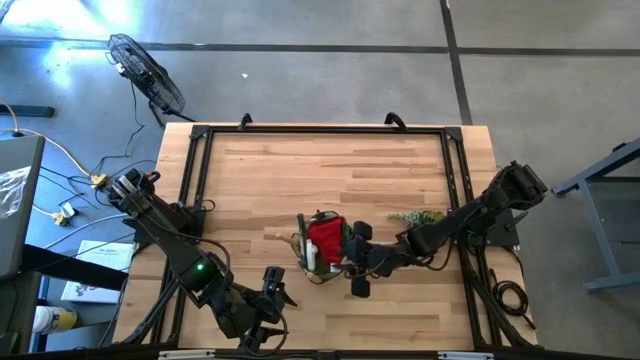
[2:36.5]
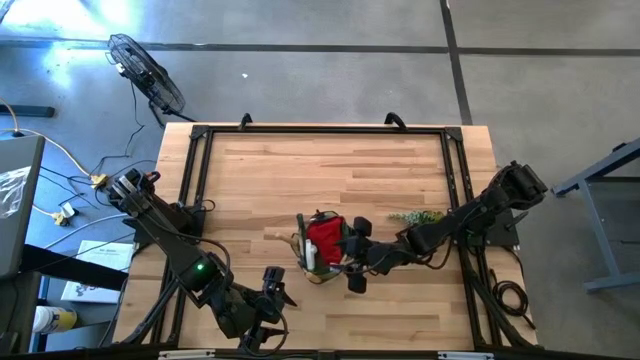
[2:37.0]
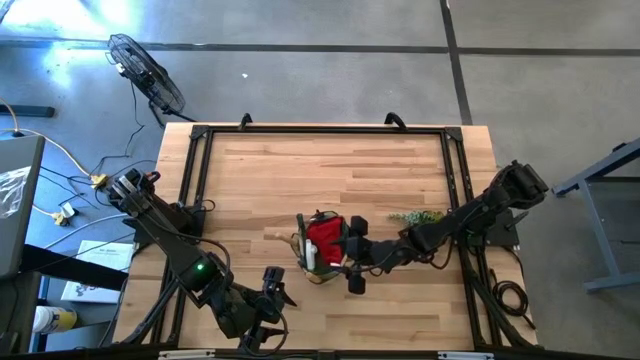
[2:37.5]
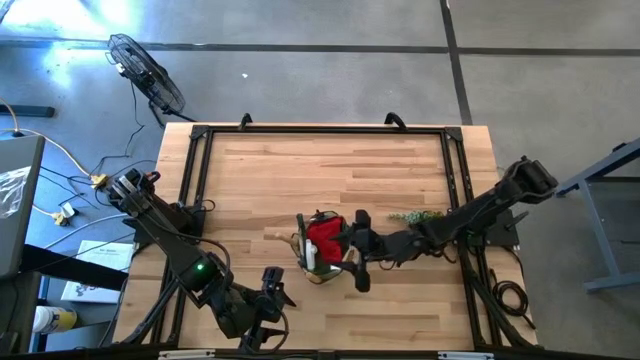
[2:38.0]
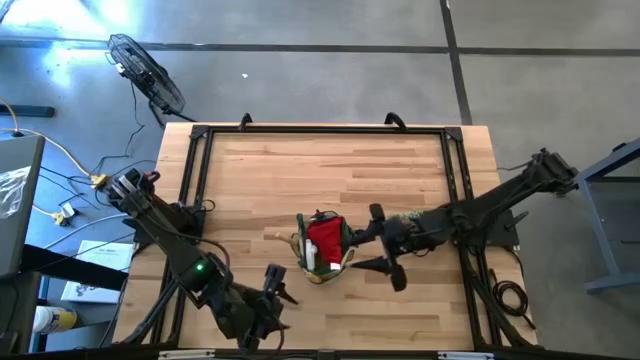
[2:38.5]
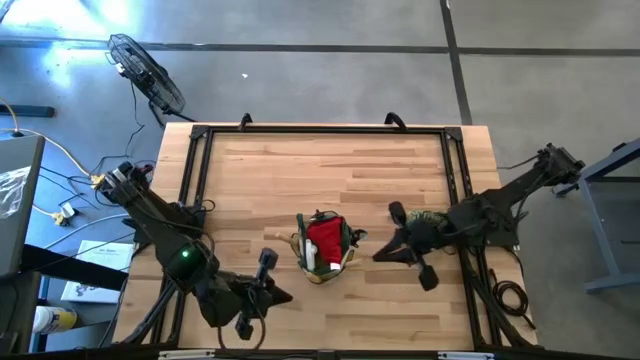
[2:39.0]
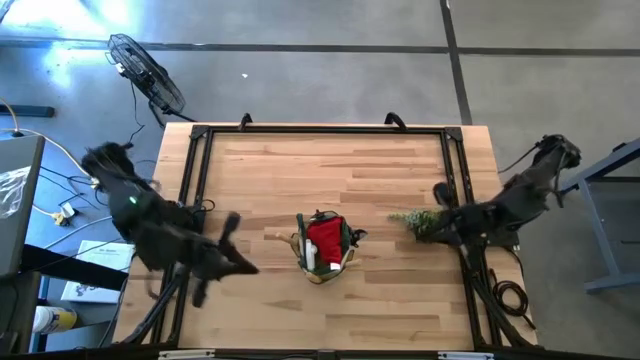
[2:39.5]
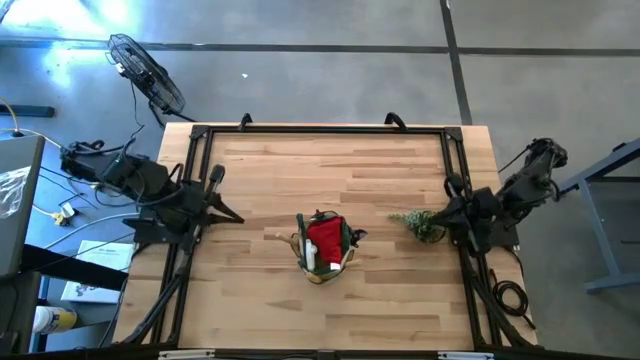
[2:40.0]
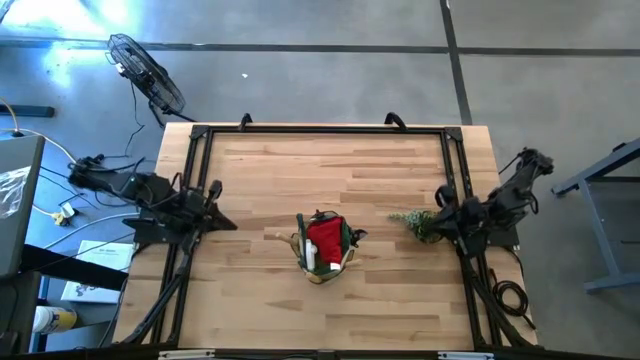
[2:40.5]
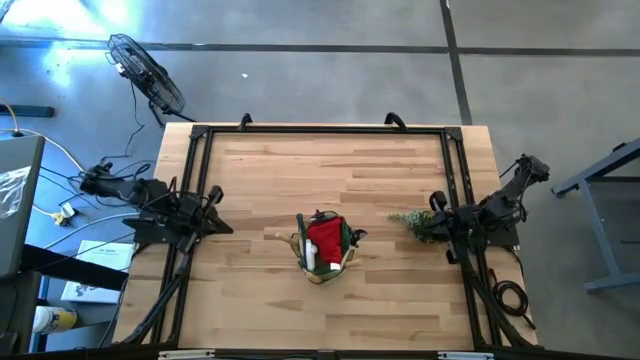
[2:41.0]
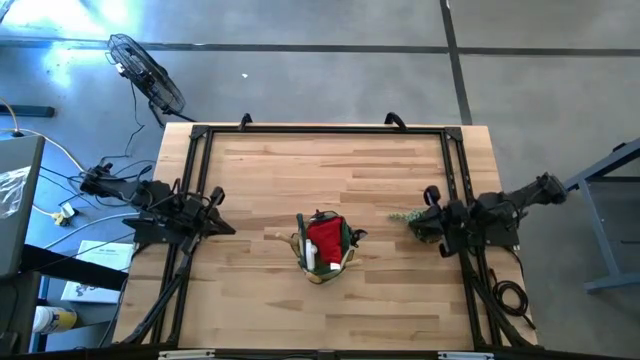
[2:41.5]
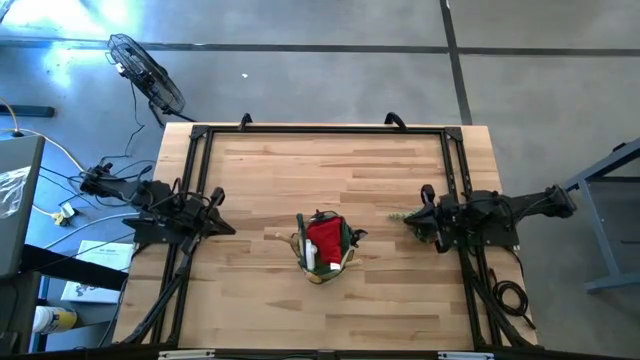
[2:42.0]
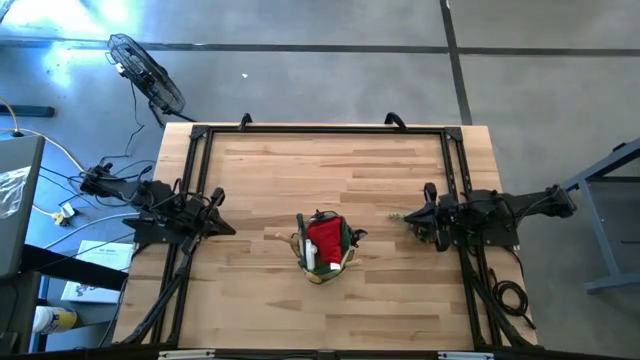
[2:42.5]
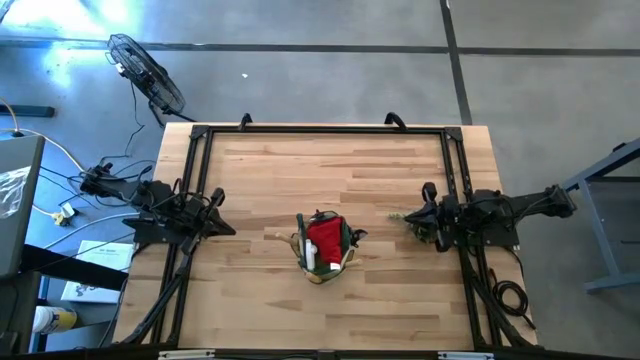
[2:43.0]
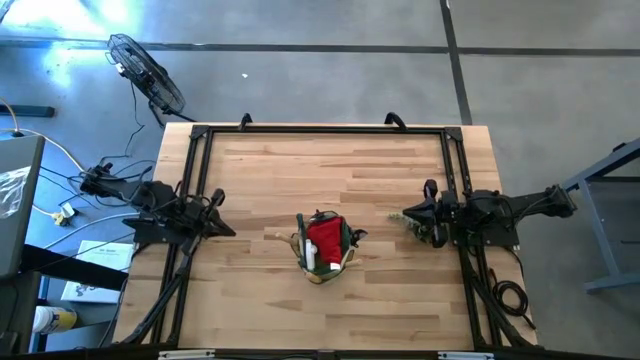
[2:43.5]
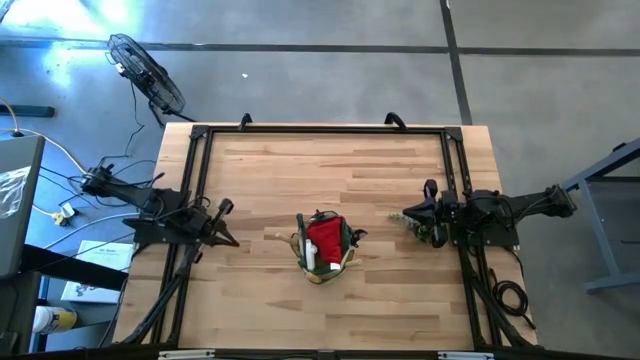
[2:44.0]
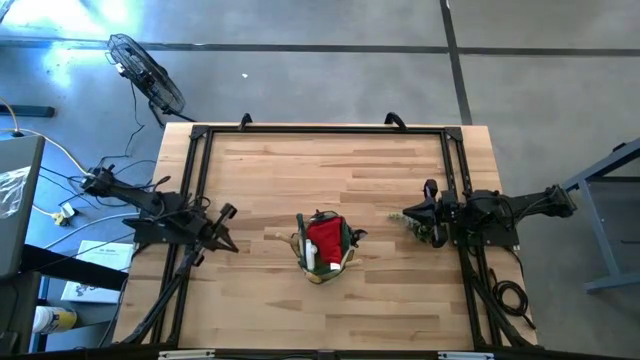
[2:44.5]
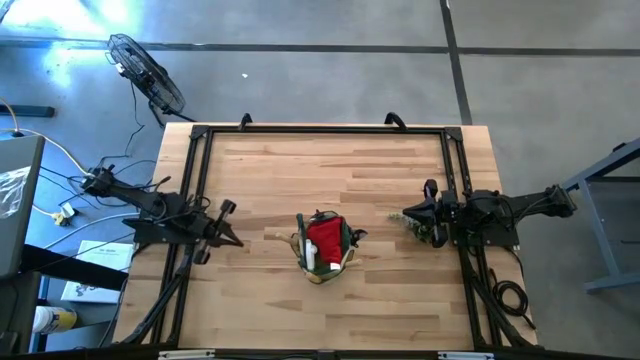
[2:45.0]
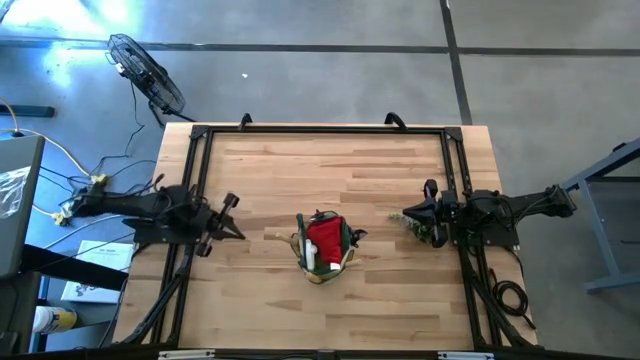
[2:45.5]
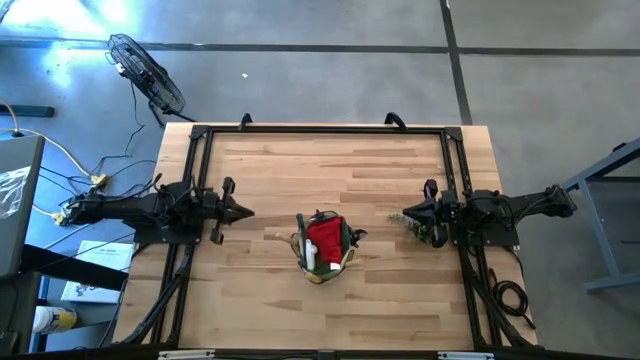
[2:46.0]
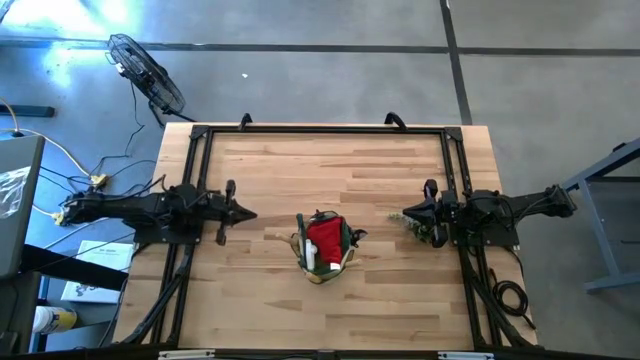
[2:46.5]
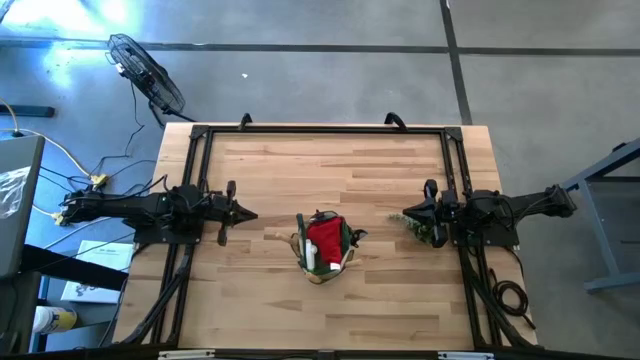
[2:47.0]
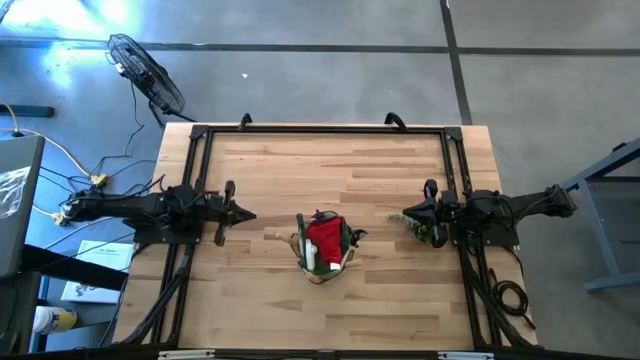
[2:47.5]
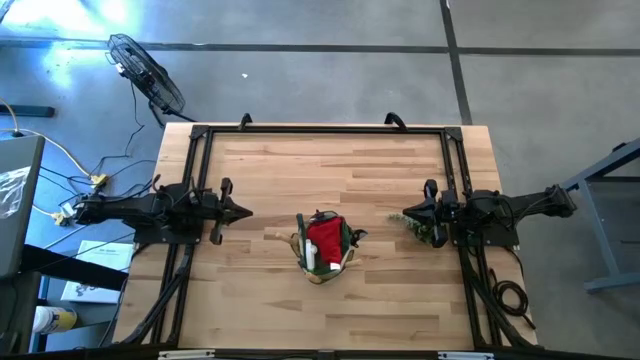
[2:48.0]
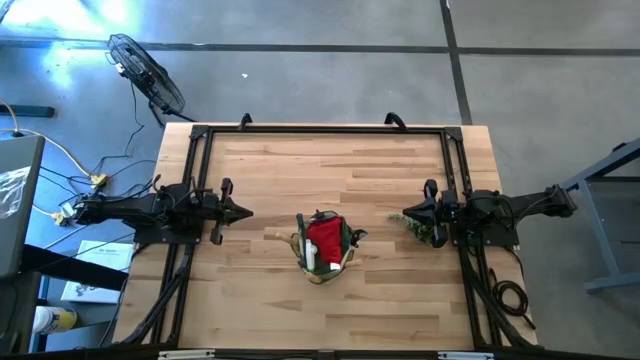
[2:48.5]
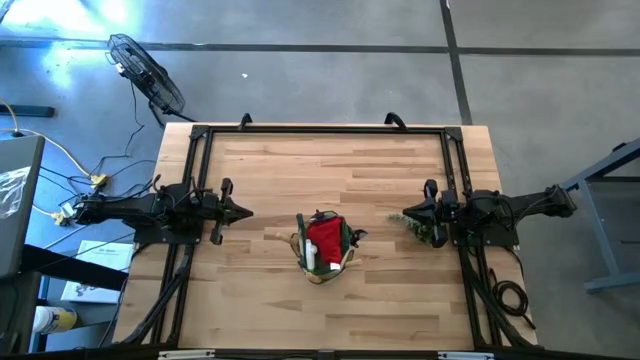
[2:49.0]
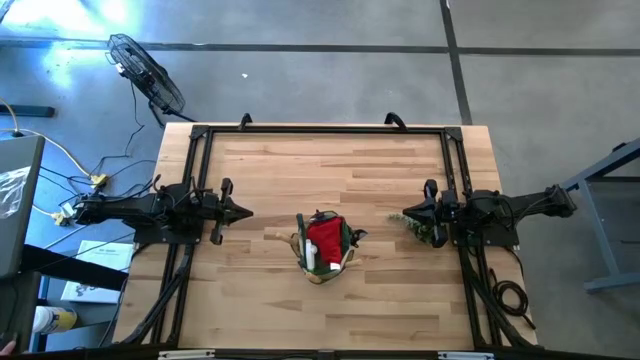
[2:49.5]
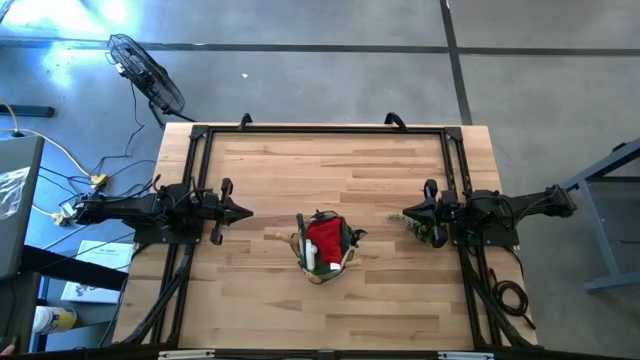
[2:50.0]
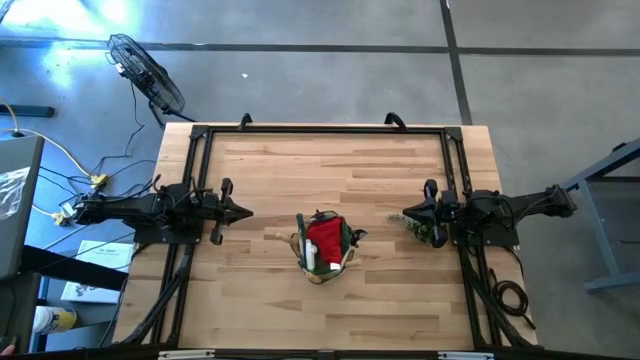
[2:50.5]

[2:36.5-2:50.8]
Task: Pick & Place Garden tools in Gardening bag
Return to Home Position

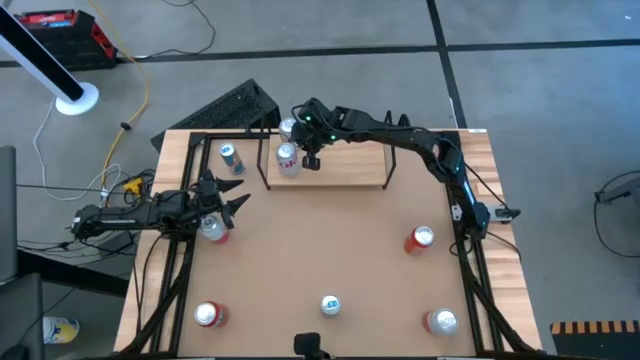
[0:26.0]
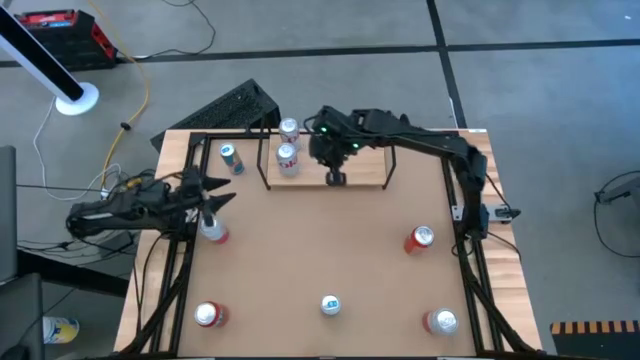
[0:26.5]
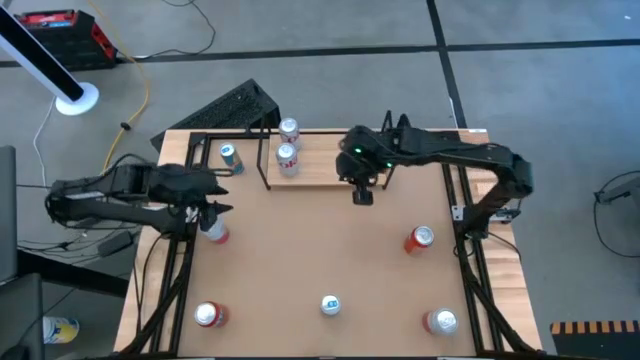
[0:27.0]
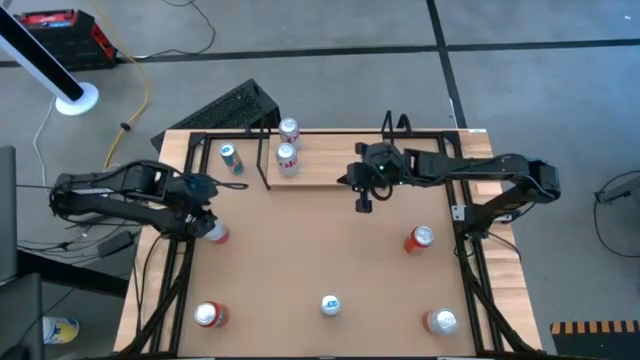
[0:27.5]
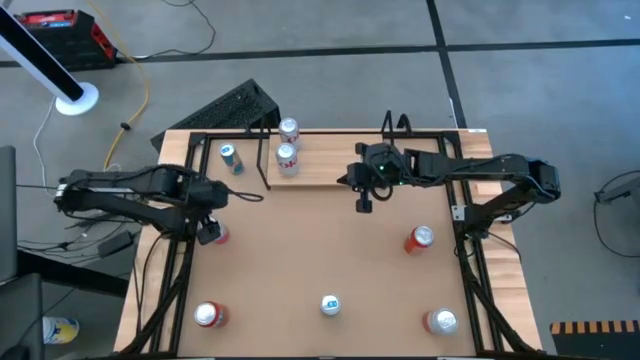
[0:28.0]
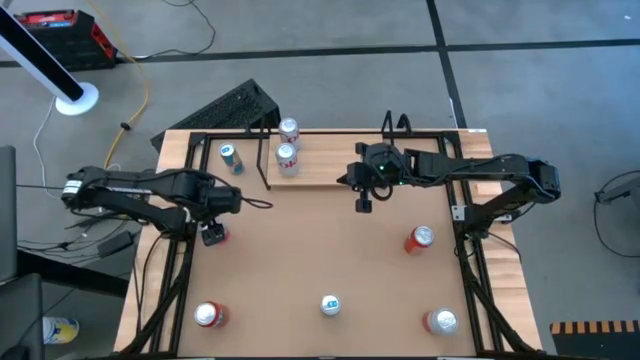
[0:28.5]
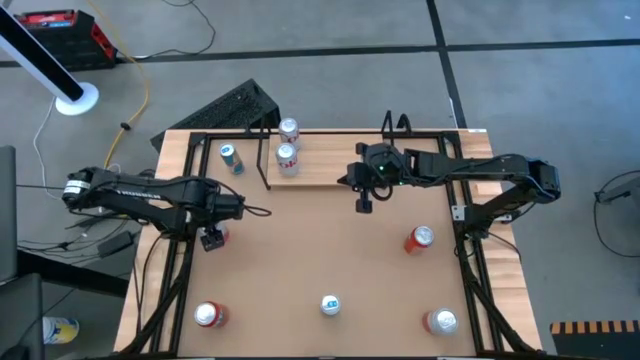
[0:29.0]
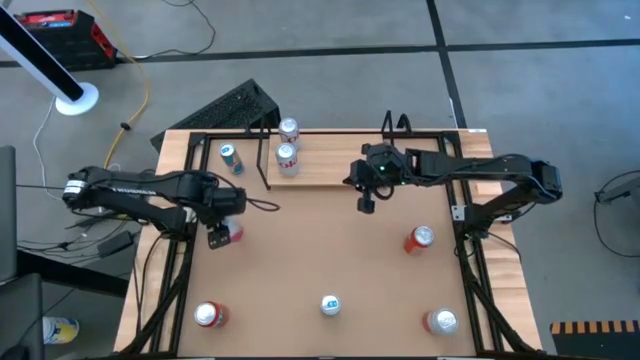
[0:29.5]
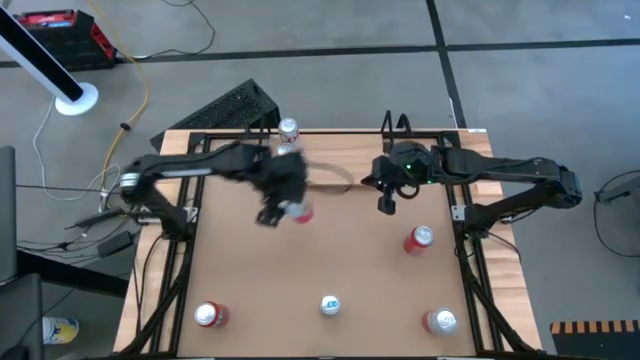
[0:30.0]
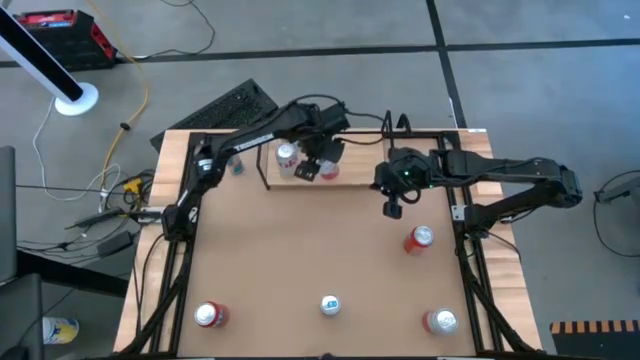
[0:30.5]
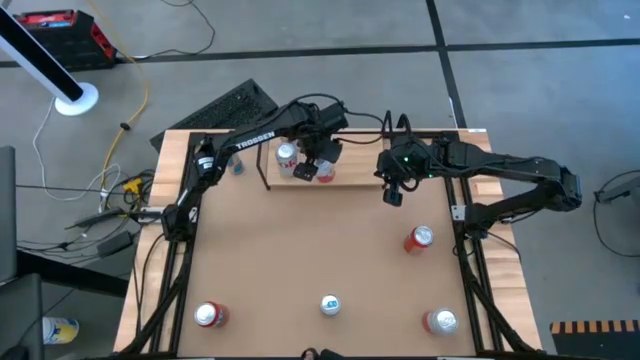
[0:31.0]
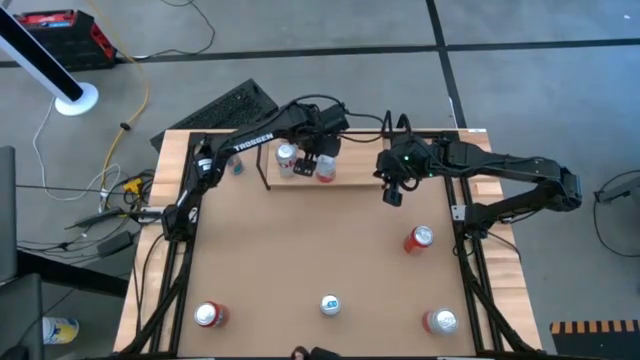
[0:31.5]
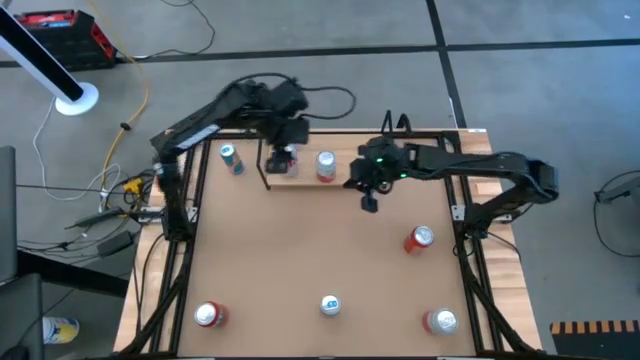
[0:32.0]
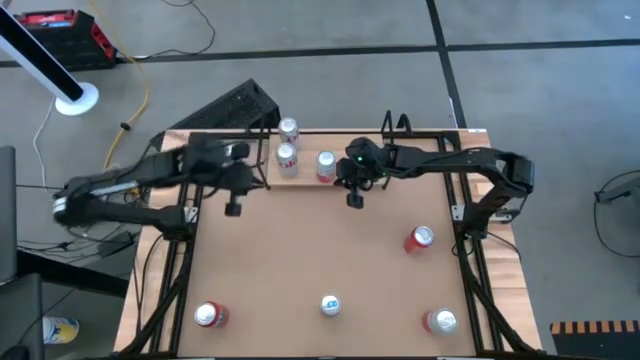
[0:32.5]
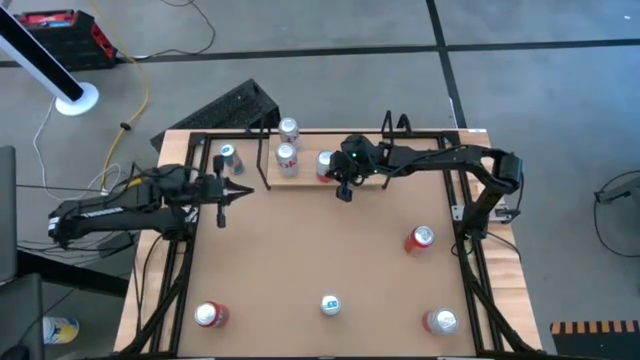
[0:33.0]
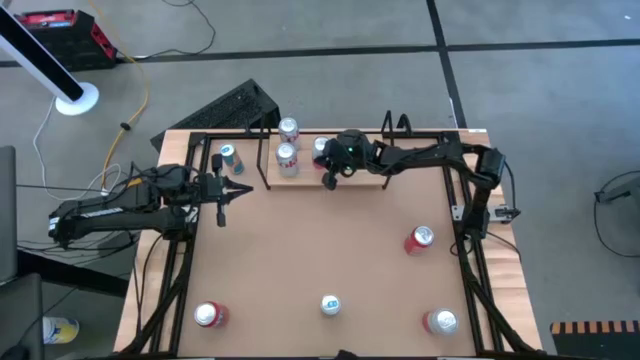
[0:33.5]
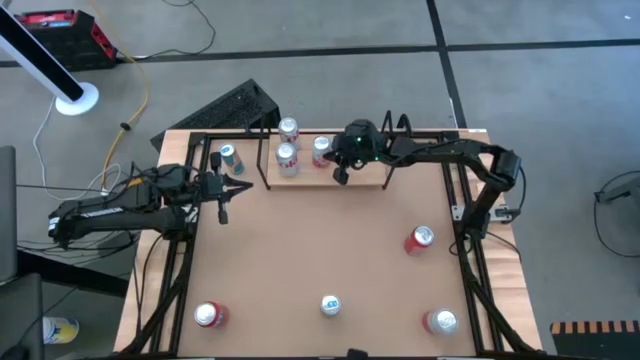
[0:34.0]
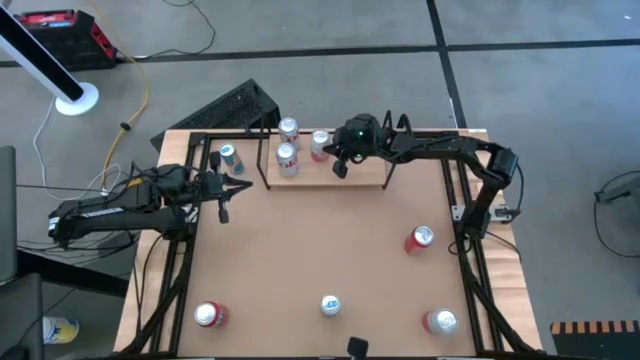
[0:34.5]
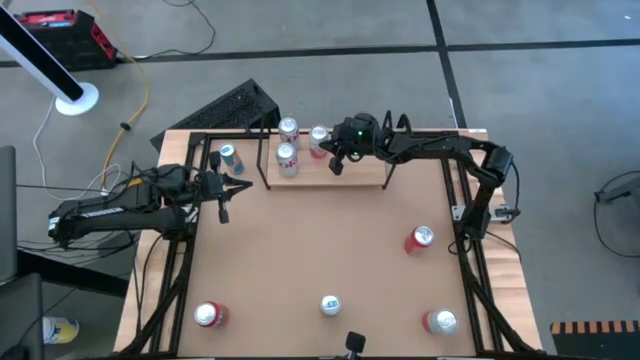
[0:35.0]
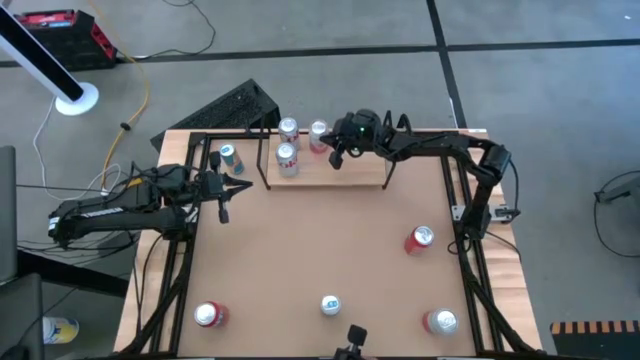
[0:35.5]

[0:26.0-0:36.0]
Task: Place canned beverage on shelf
Put the top pink-white soda can on the shelf
